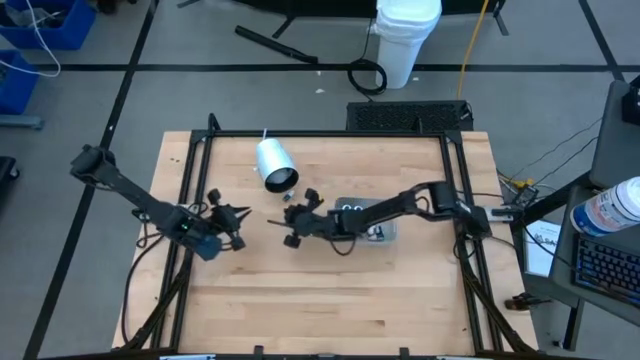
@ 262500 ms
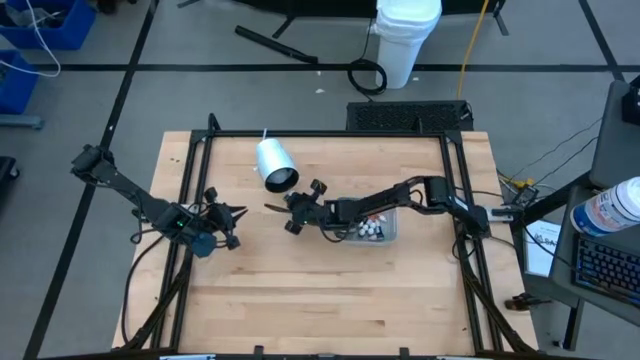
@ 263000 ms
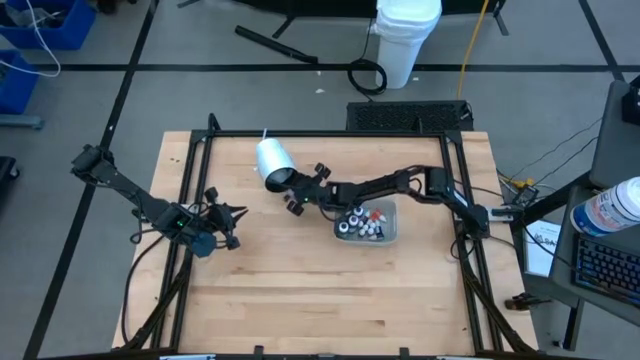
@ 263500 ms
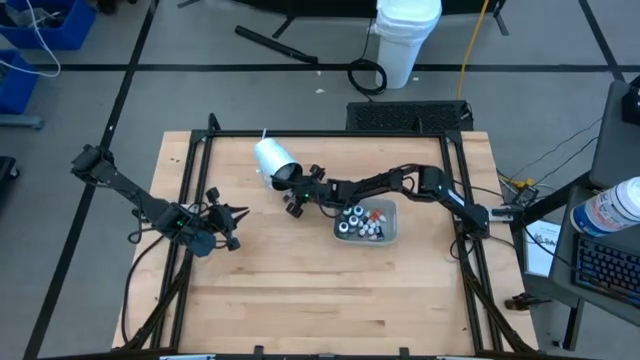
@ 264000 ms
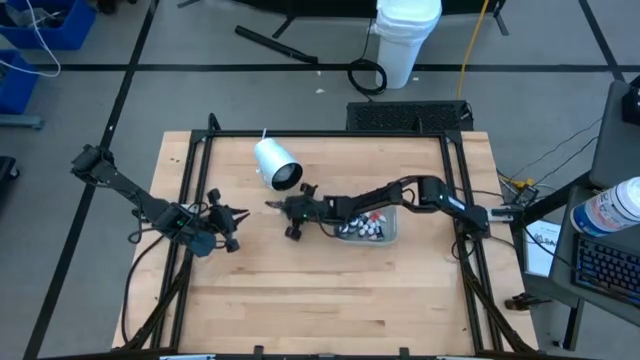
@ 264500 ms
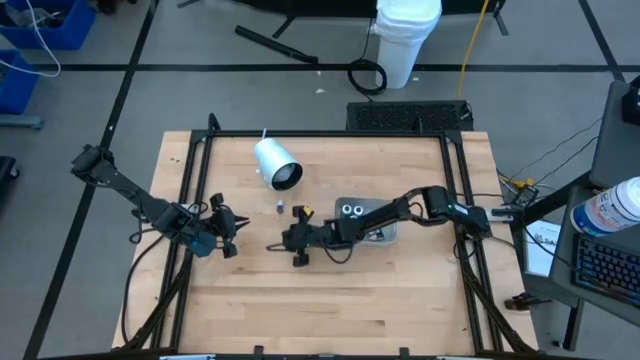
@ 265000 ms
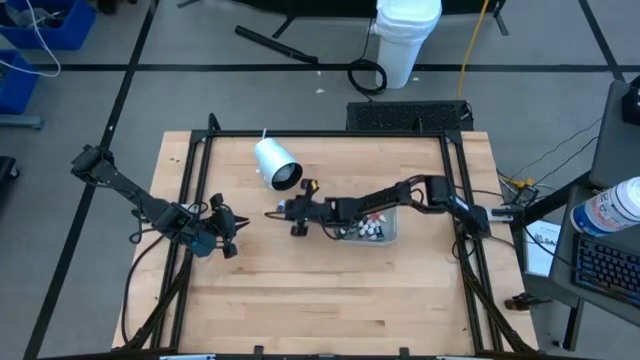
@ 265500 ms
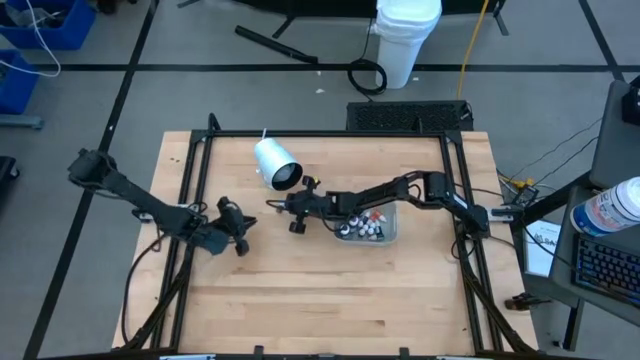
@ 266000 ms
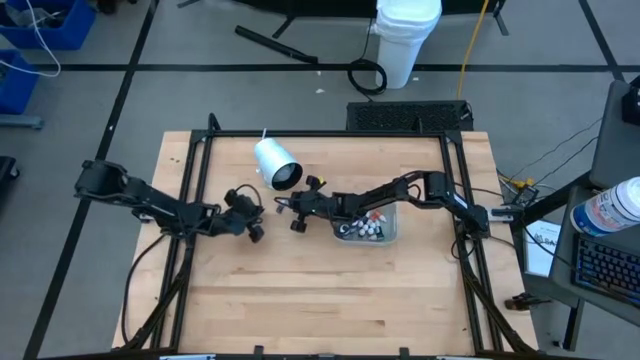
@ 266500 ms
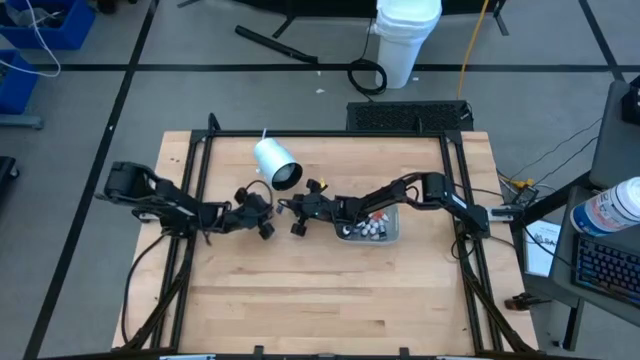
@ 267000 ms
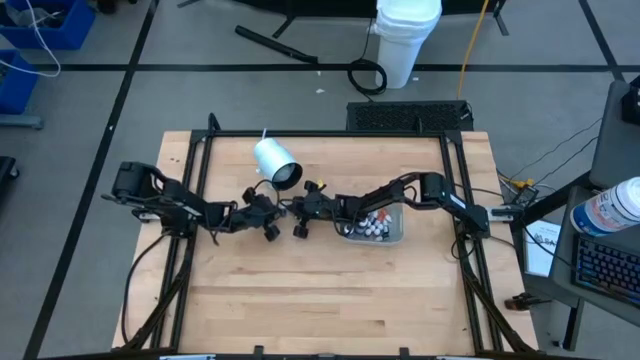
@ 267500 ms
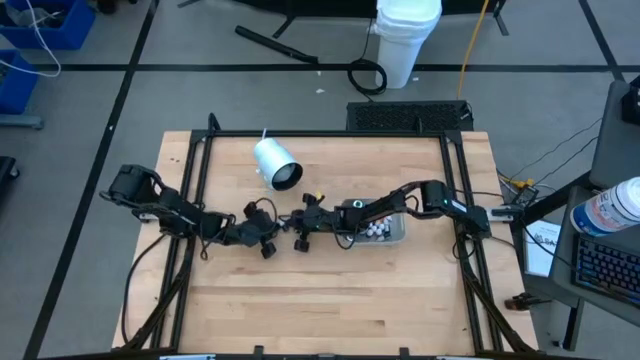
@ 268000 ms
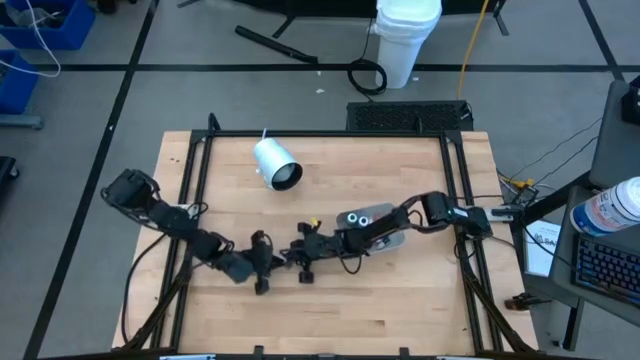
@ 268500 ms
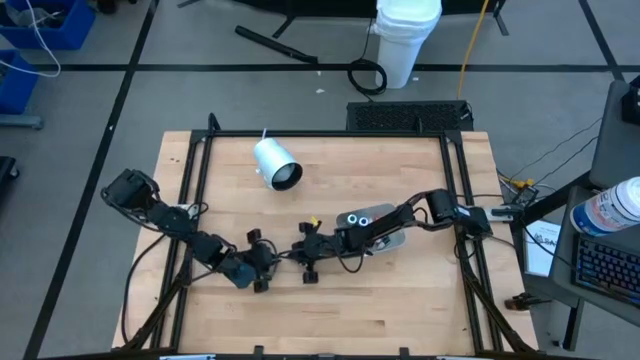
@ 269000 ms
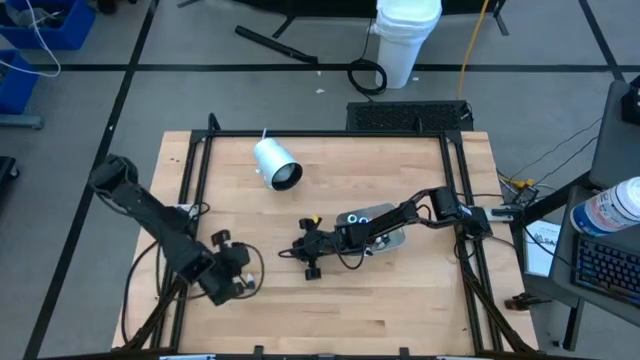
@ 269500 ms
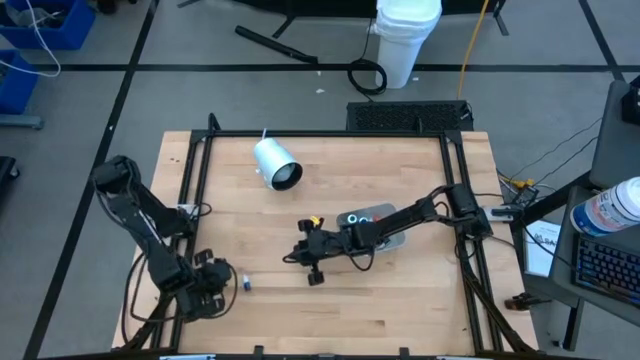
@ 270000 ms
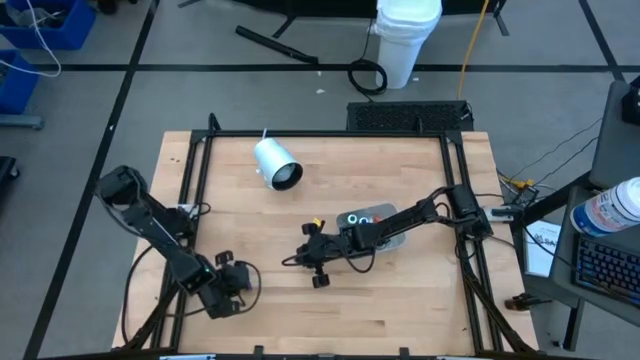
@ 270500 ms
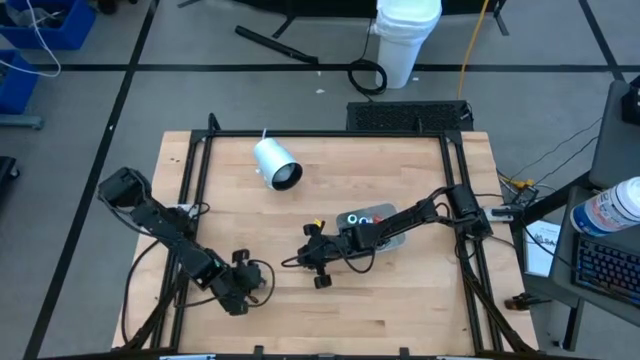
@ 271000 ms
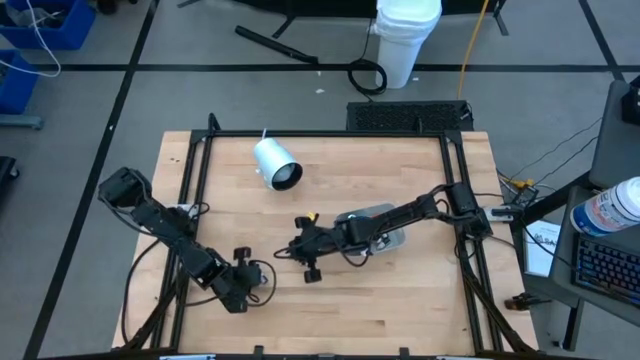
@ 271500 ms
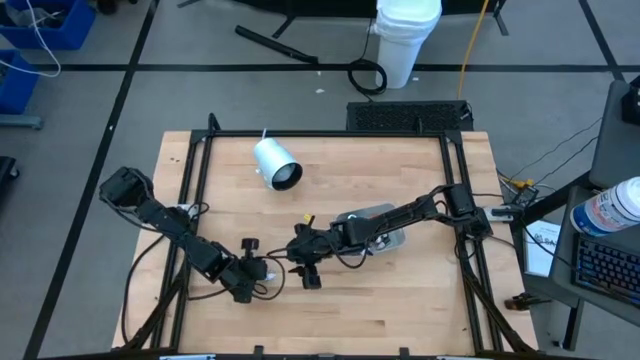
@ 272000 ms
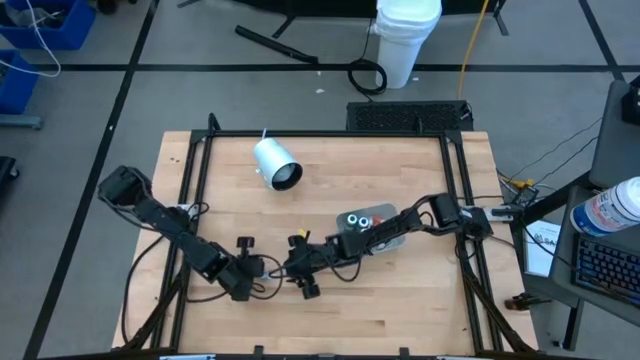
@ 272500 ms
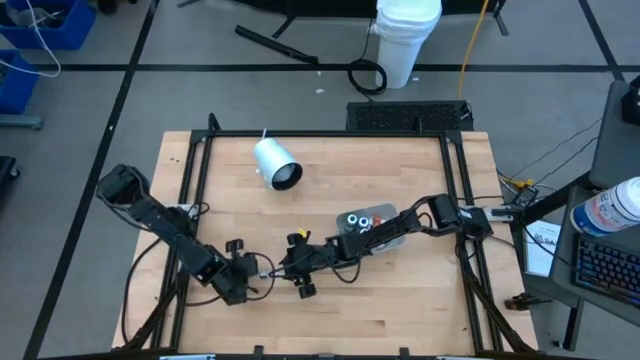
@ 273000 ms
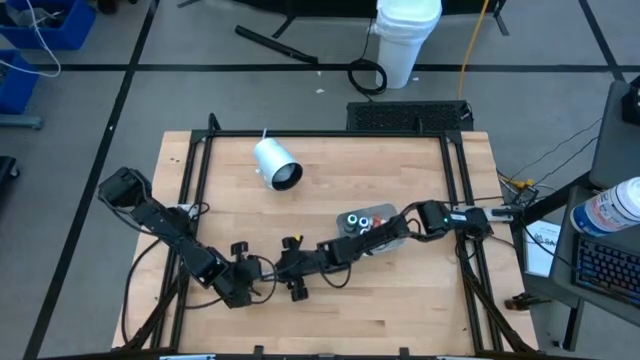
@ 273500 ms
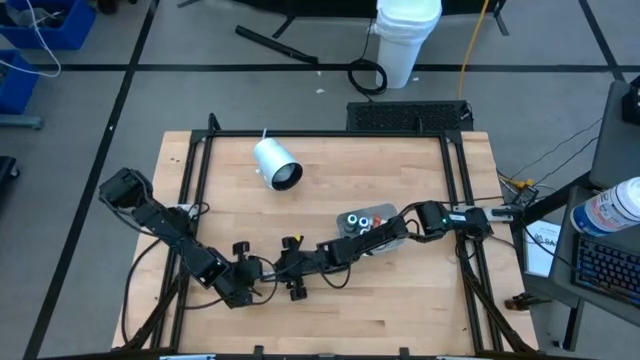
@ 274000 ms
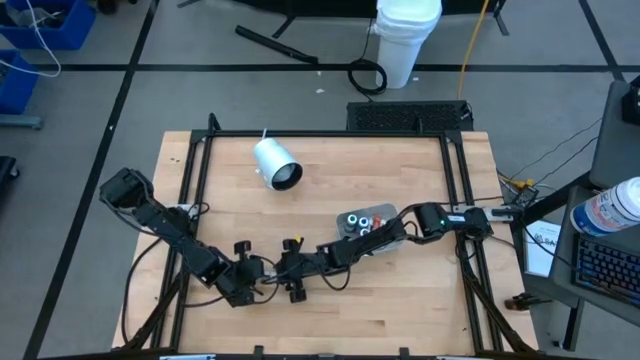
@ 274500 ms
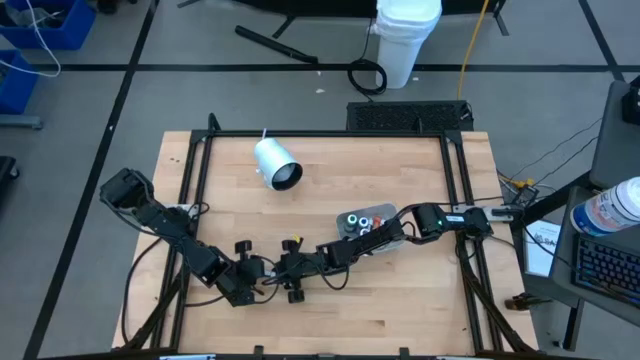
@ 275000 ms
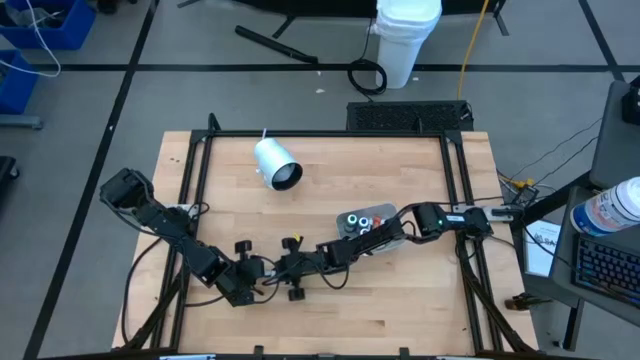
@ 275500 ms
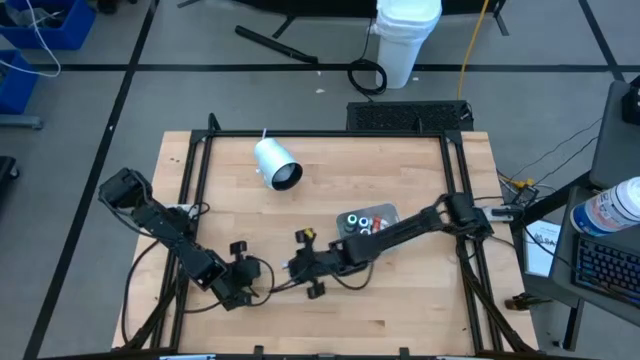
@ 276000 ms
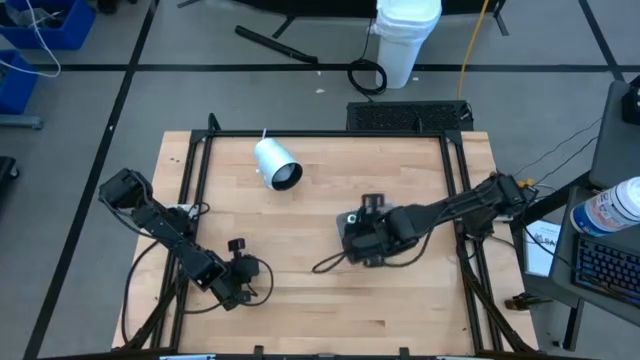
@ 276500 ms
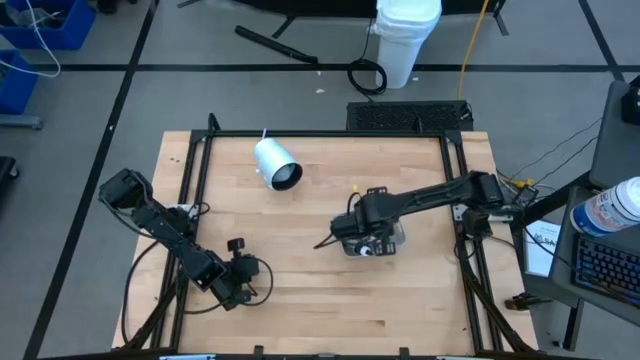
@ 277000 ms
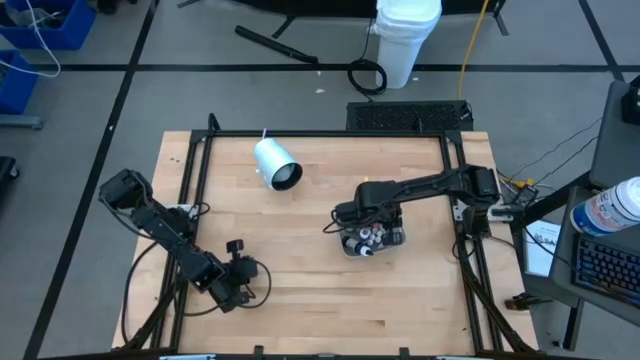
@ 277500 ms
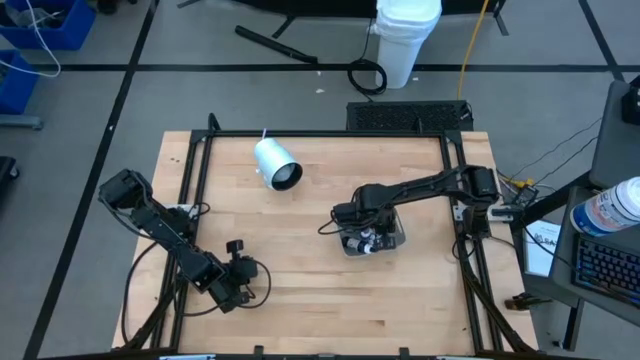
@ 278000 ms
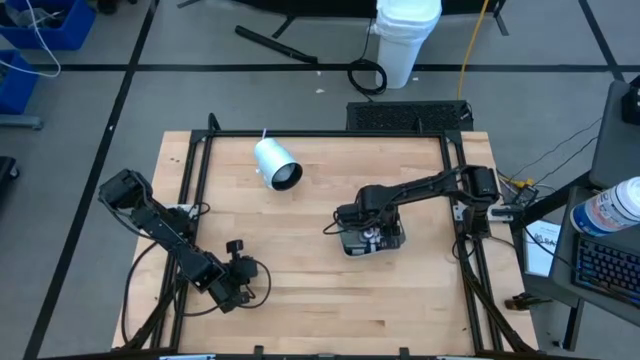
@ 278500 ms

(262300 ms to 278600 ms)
Task: Pick & Place food coloring
Put the small blue food coloring bottle into the white bin

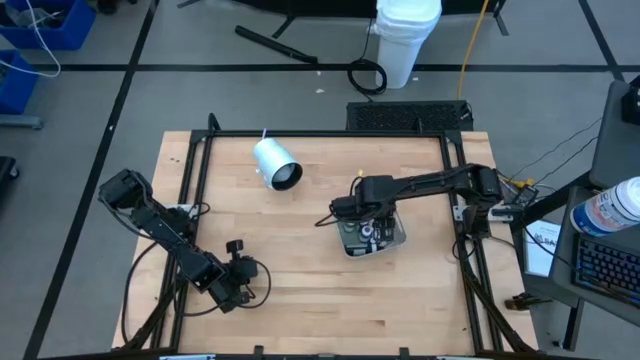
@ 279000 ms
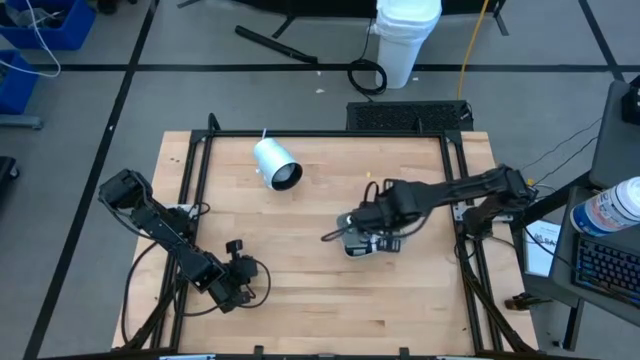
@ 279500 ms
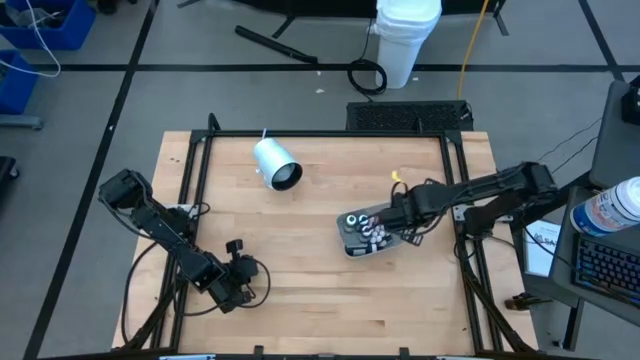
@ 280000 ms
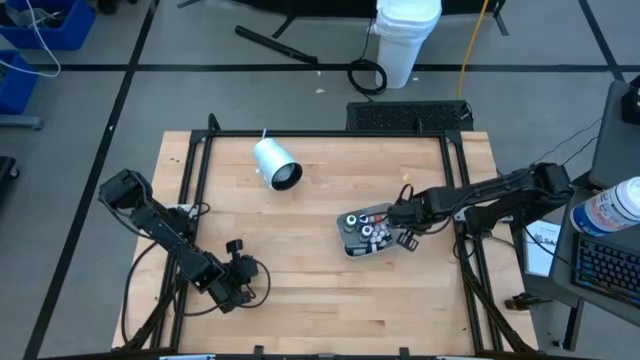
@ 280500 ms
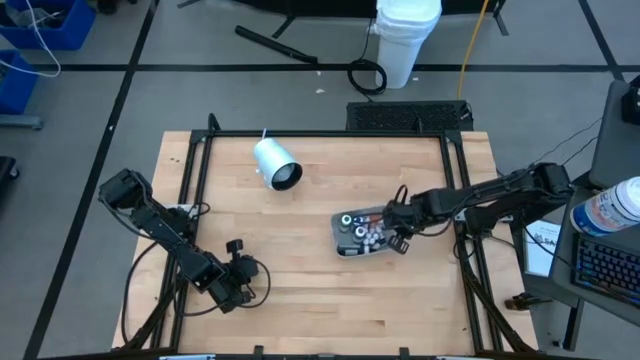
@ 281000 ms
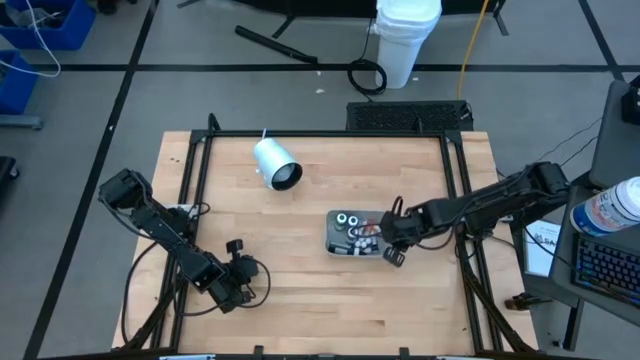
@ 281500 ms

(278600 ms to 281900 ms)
Adjust the white bin

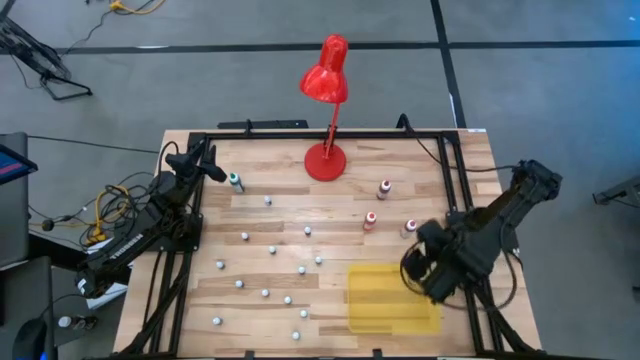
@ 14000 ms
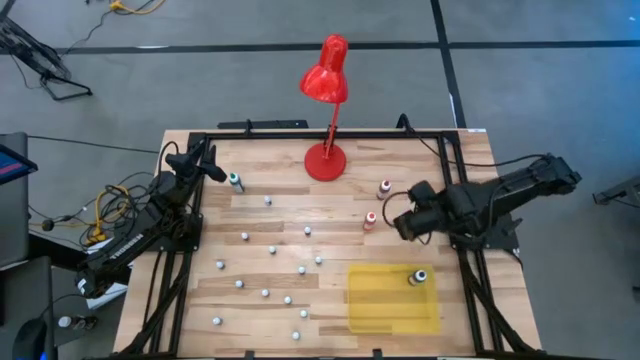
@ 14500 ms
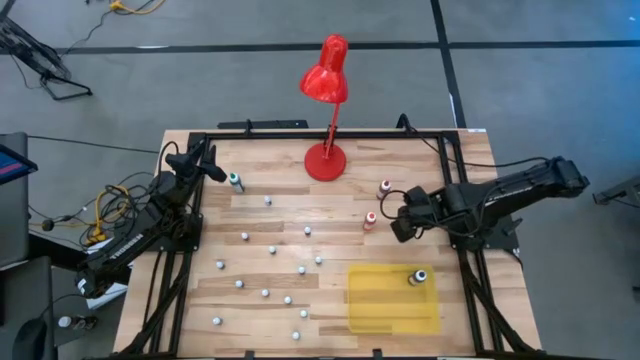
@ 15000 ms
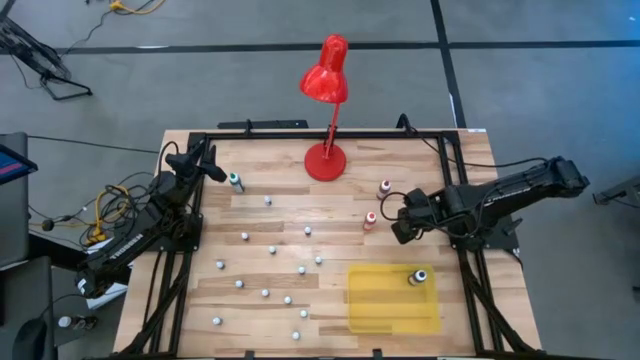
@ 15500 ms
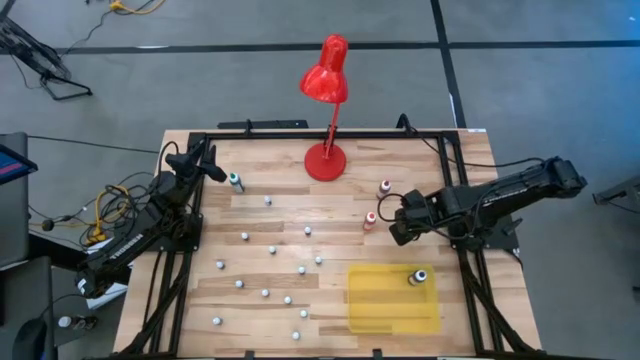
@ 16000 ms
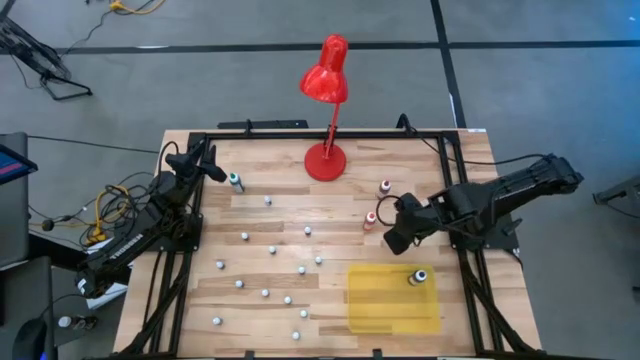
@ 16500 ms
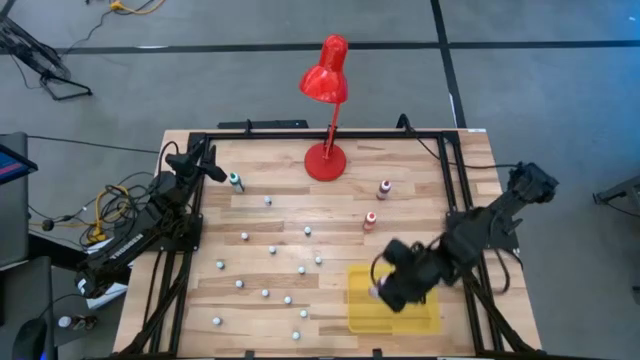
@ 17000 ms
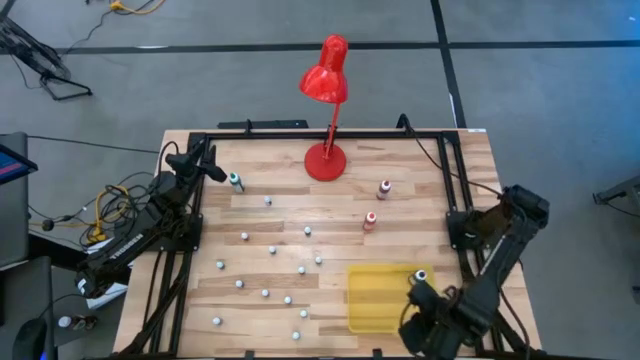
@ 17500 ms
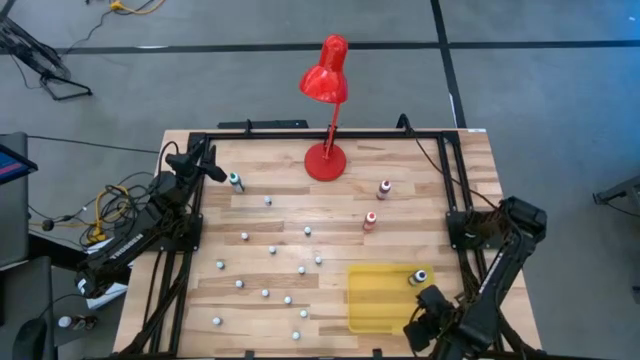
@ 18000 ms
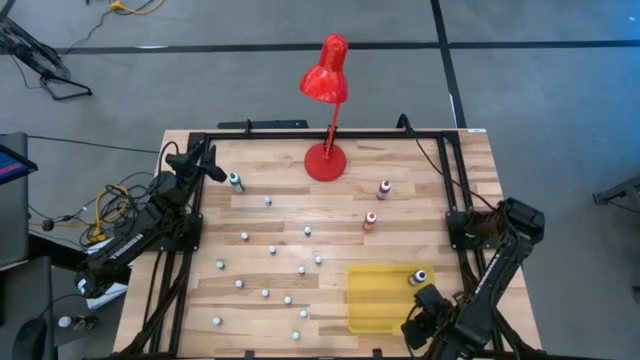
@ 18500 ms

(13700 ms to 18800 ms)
Task: Pick & Place food coloring
Put the large pink food coloring into the yellow bin
